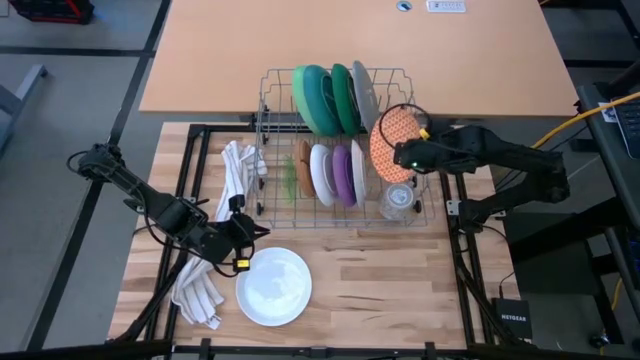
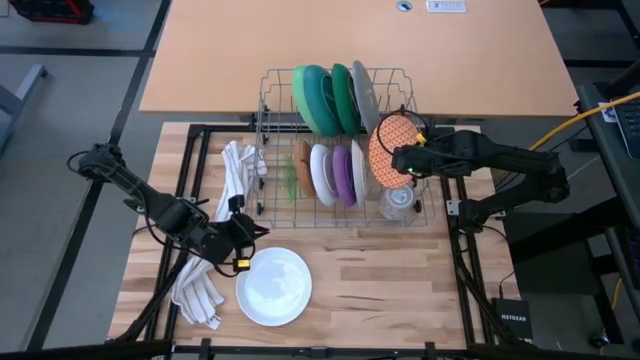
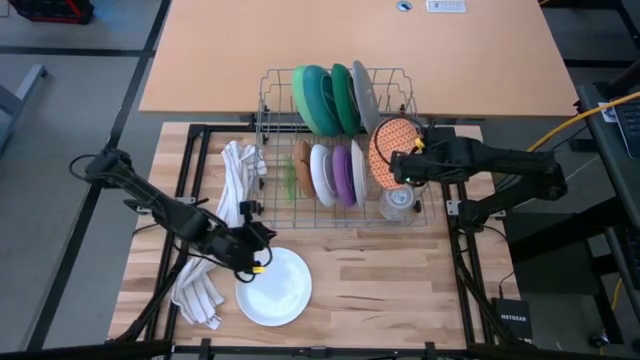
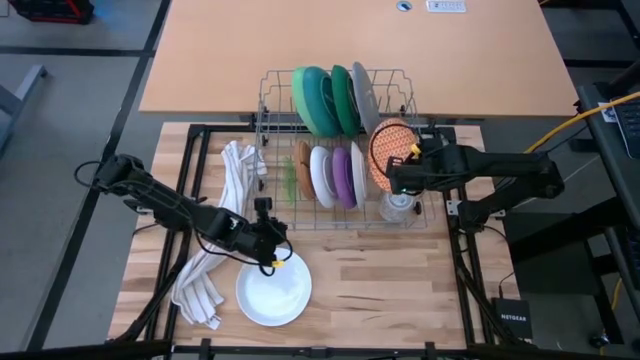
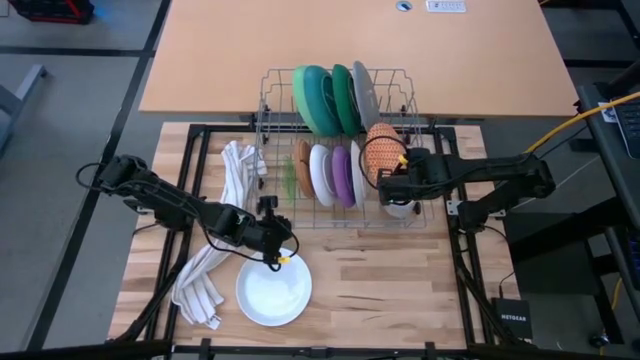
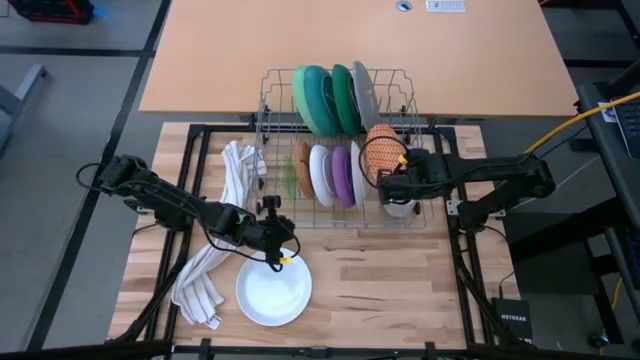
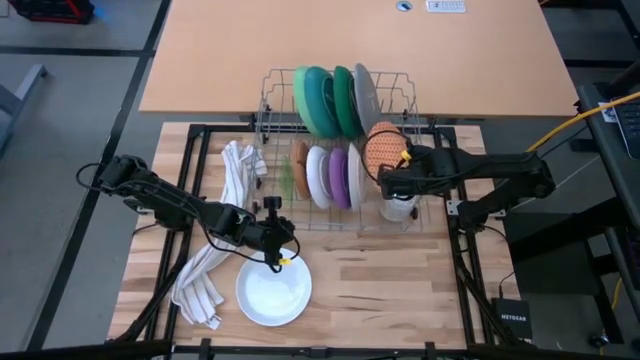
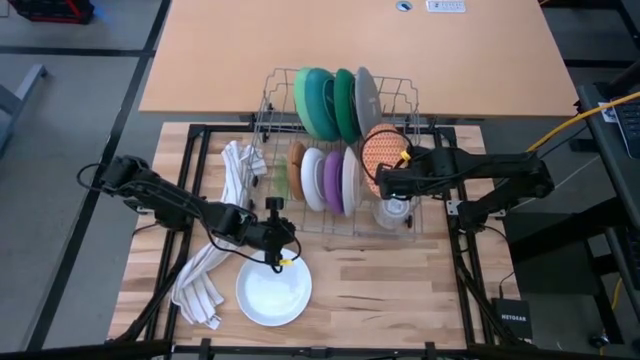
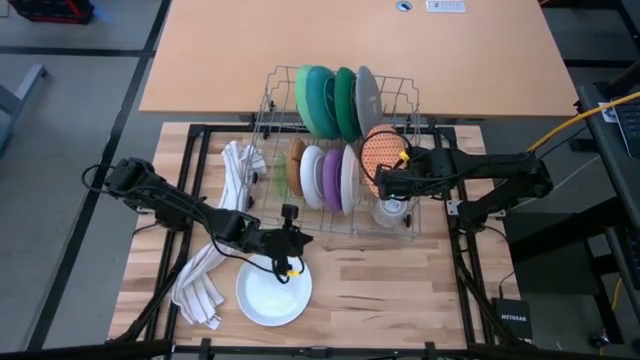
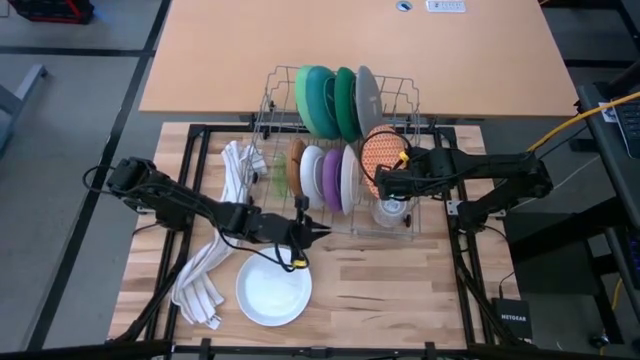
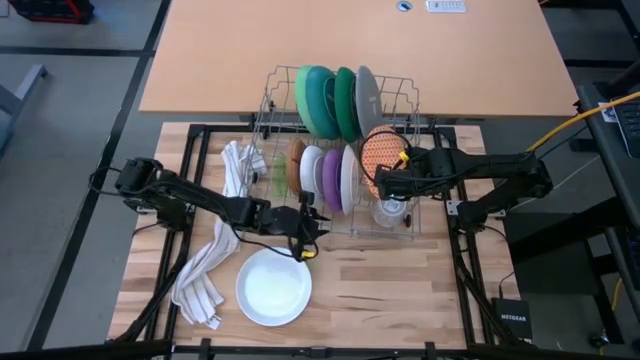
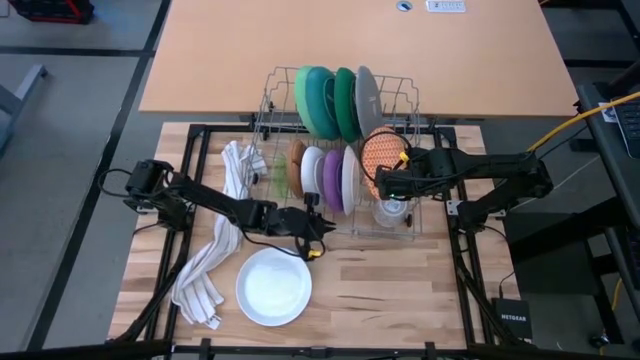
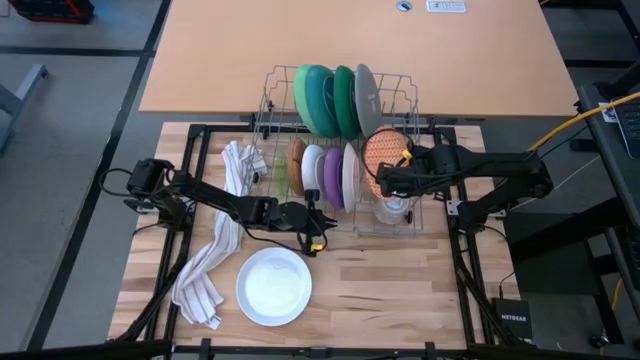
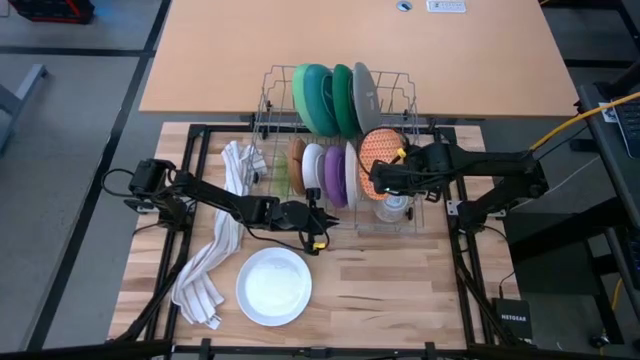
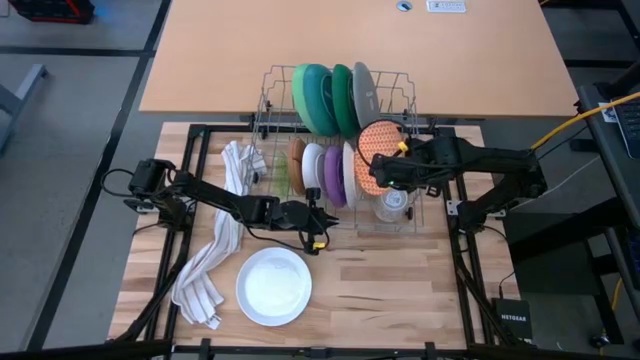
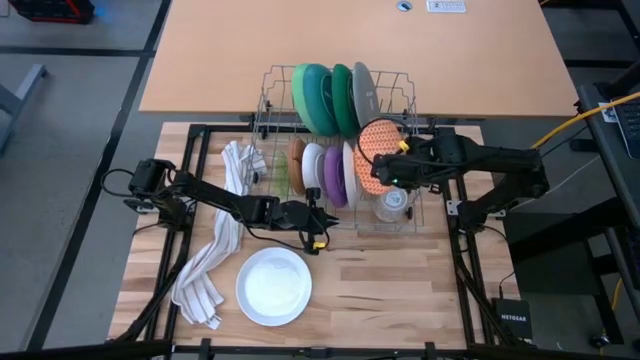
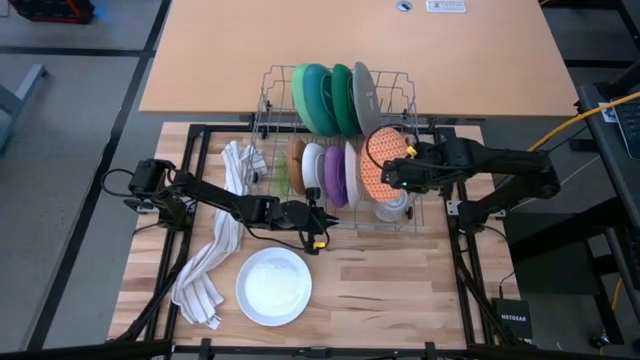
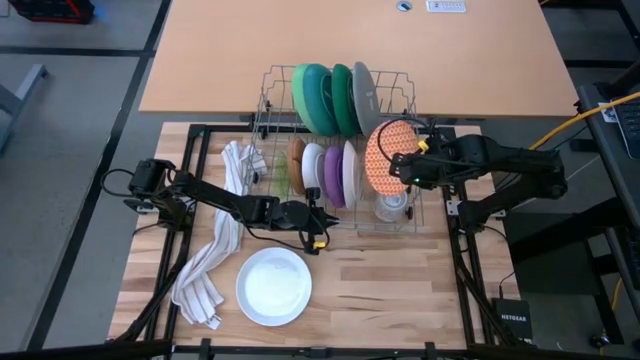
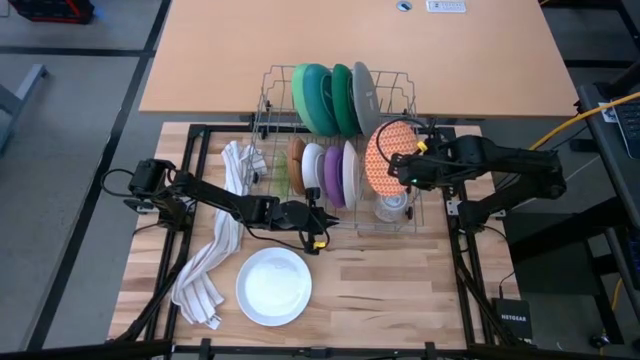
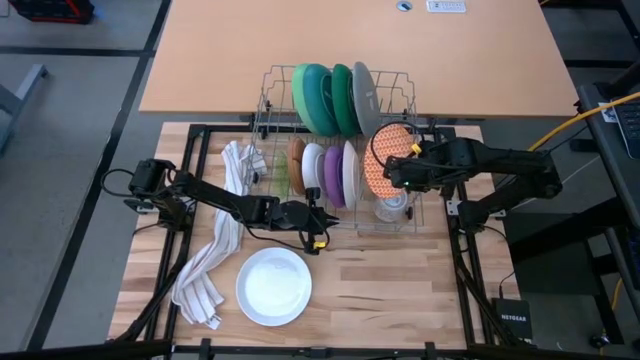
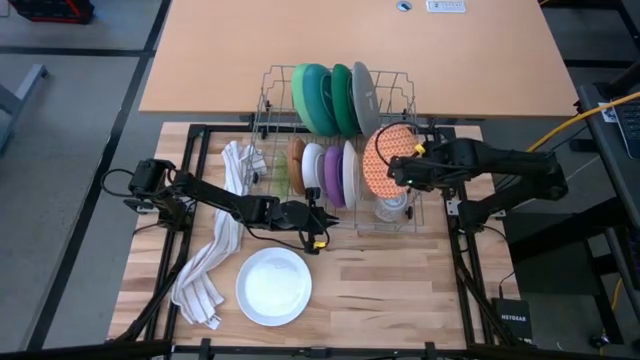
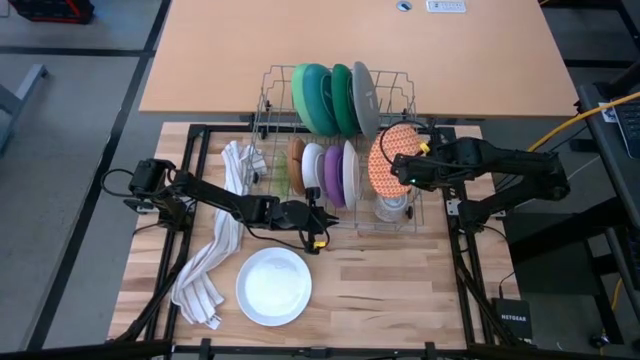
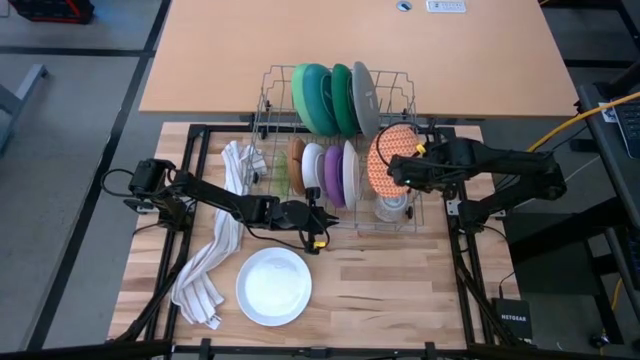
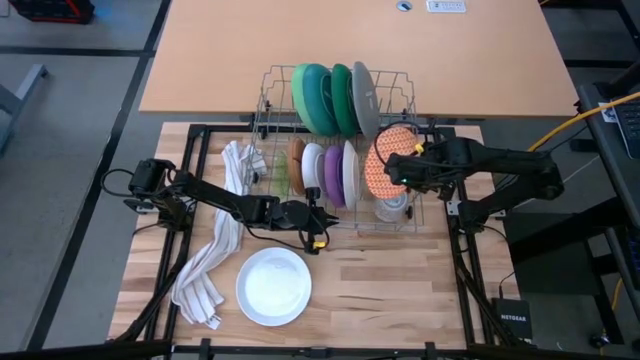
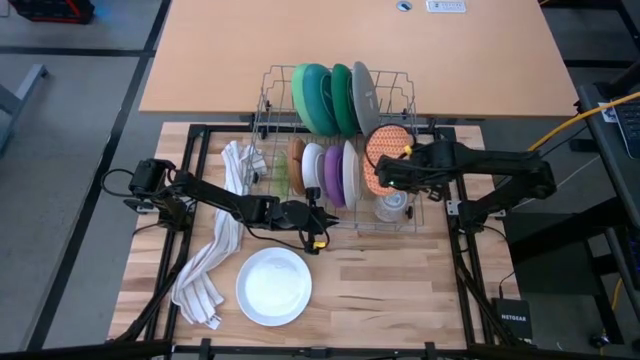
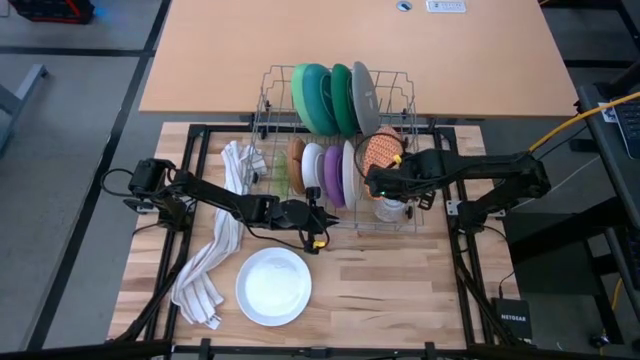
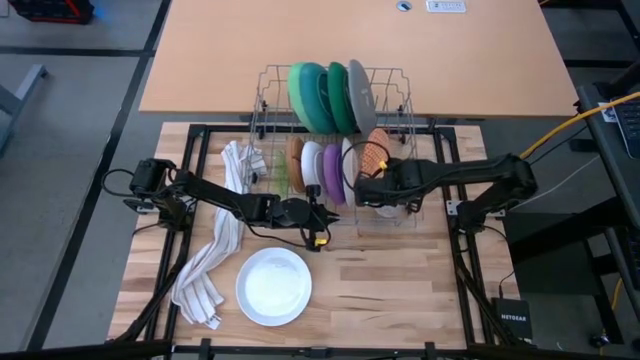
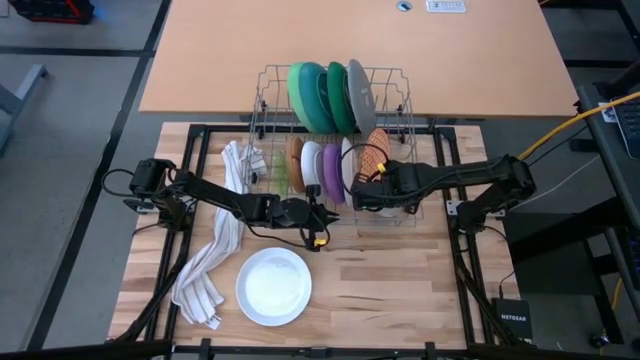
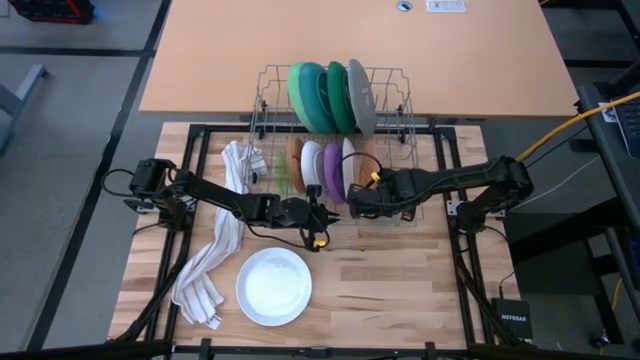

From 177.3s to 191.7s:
Task: Sort dishes
Put the orange plate into the dish rack

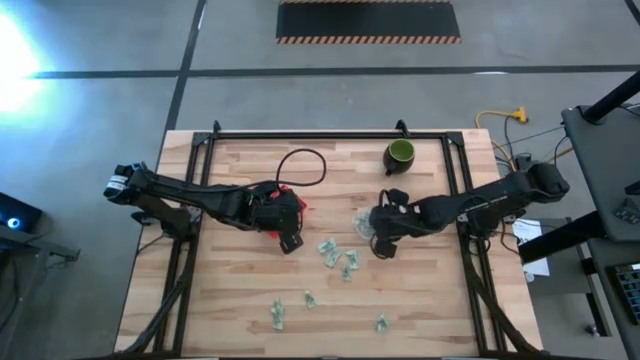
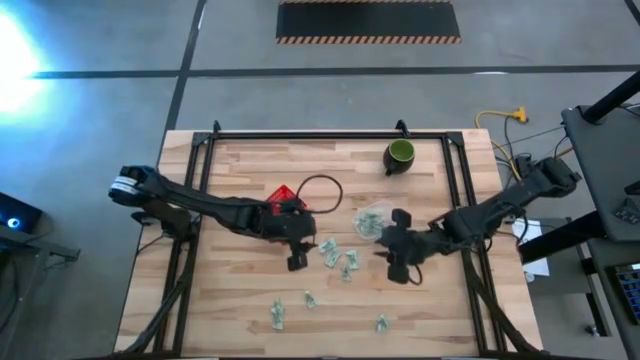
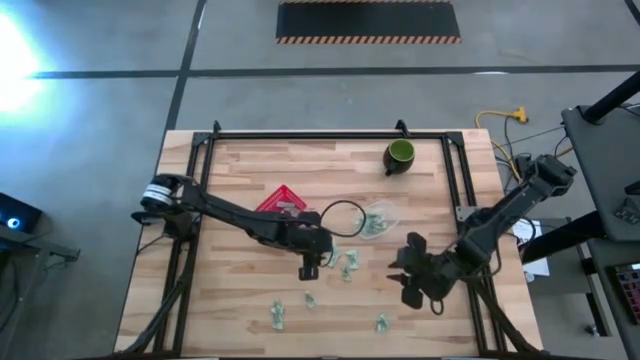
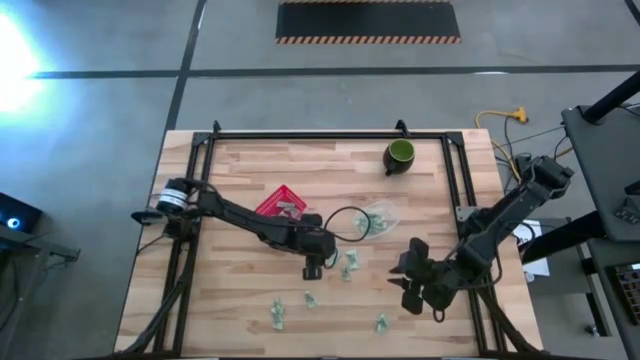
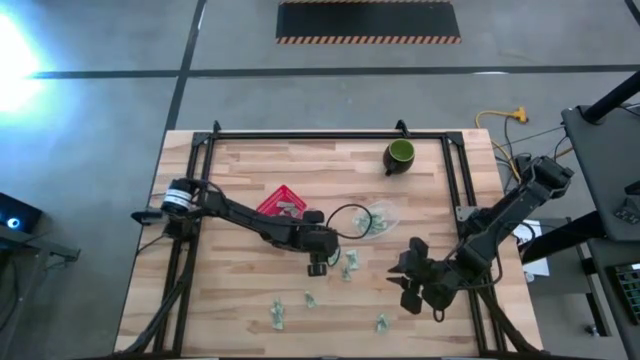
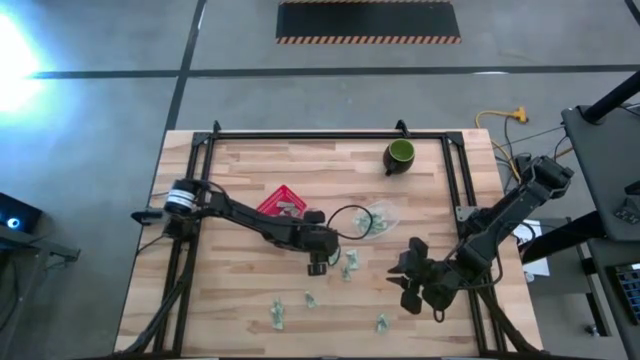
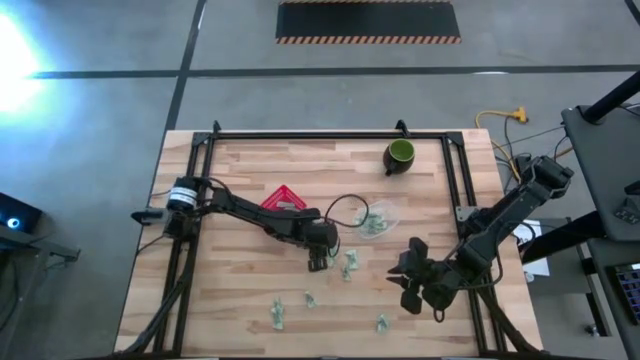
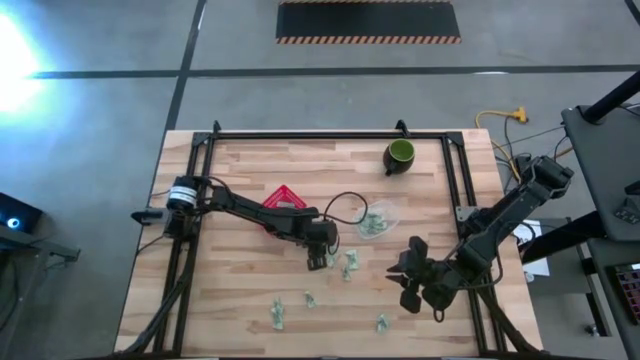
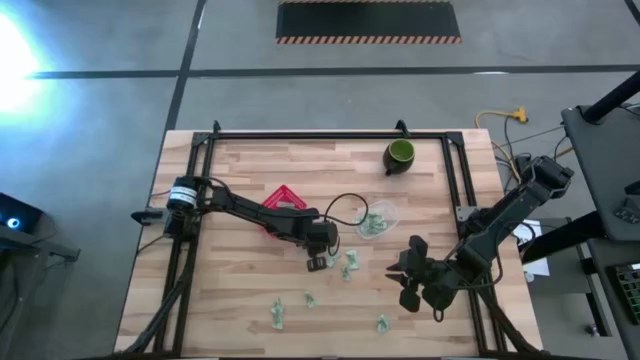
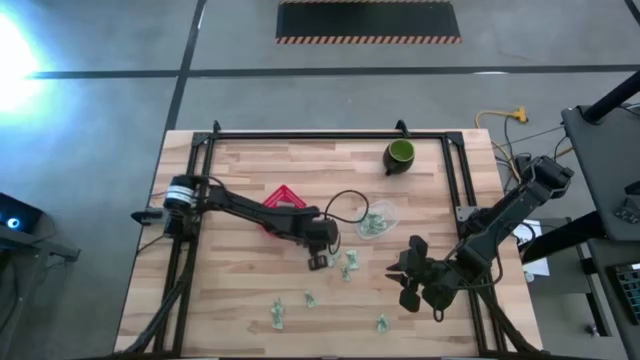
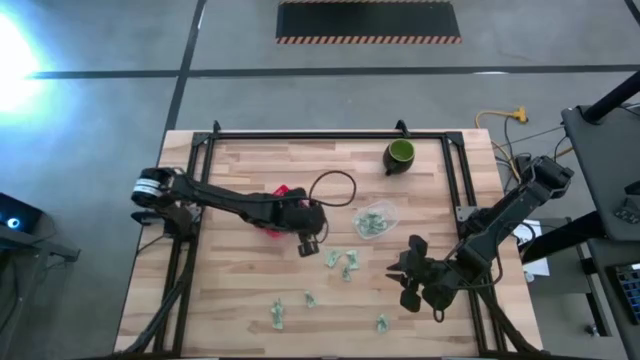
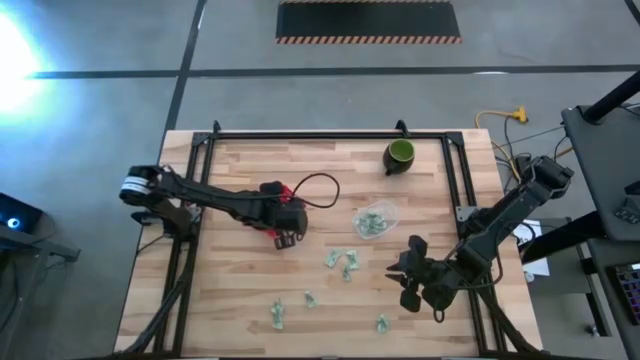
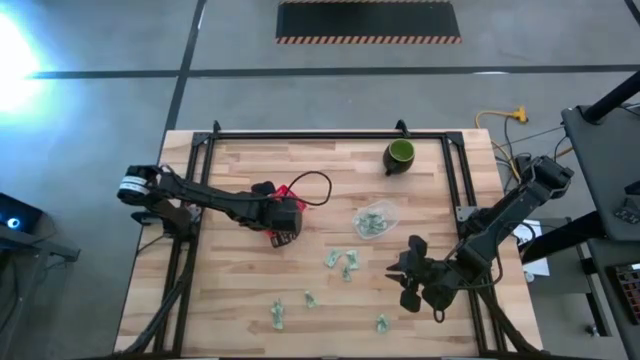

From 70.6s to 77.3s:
Task: Pick and place items into bin
Put the stevia packet into the red bin

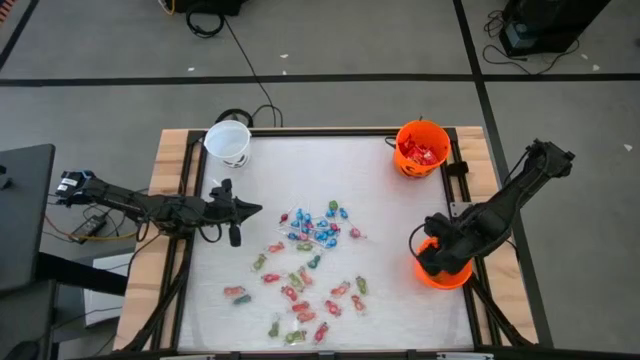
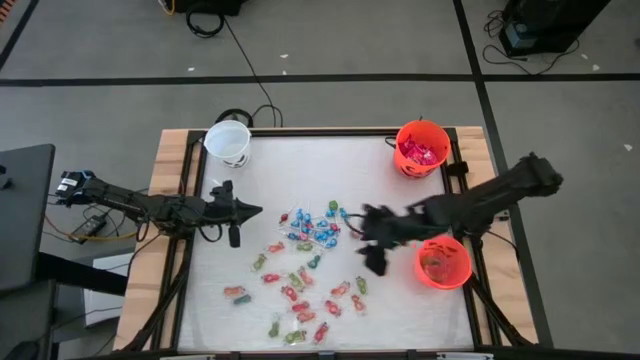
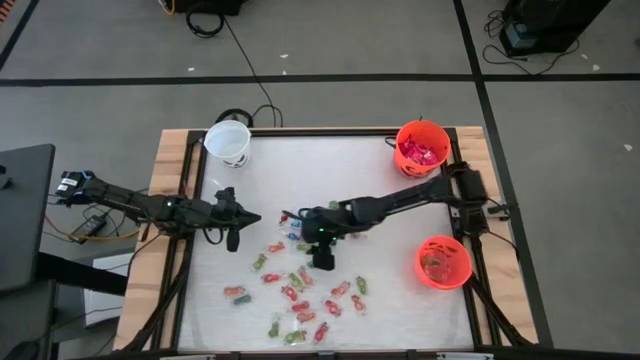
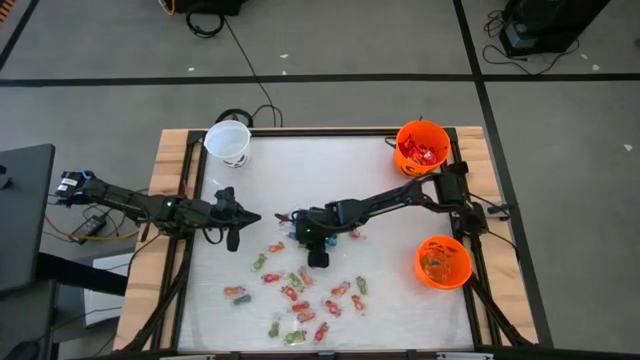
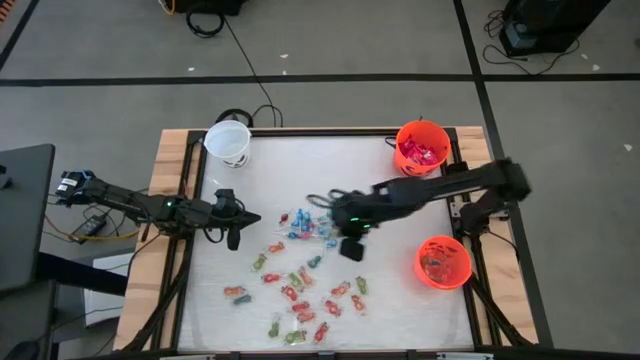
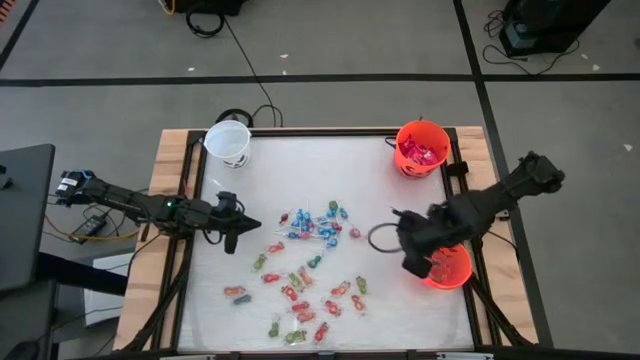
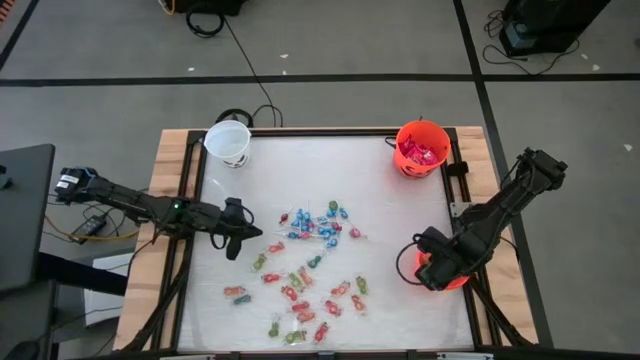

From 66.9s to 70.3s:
Task: Sort candy by brand, put in halloween buckets
Put the green gummy into the bottom orange bucket
